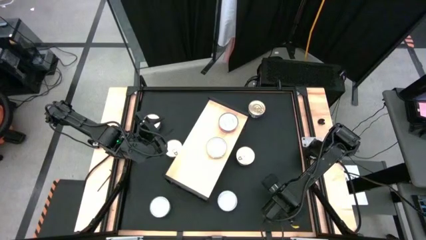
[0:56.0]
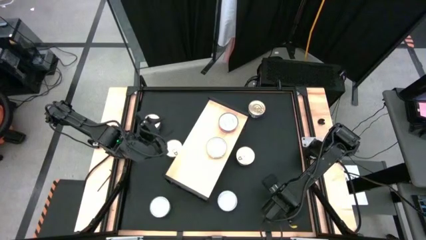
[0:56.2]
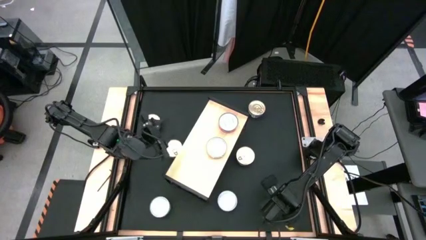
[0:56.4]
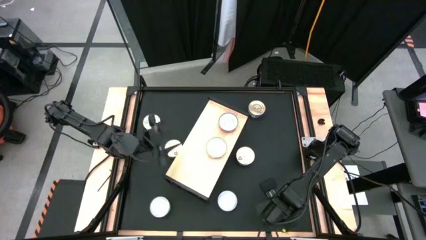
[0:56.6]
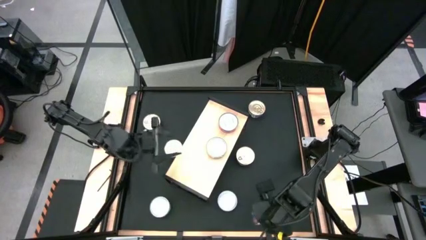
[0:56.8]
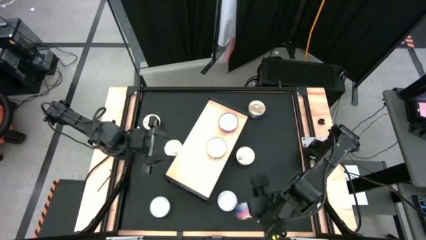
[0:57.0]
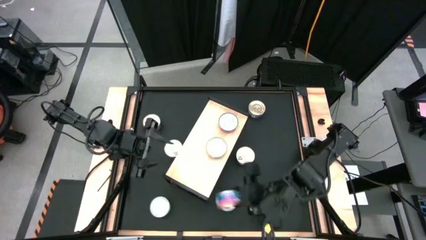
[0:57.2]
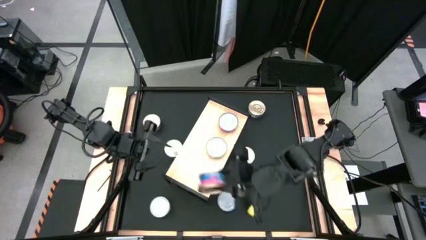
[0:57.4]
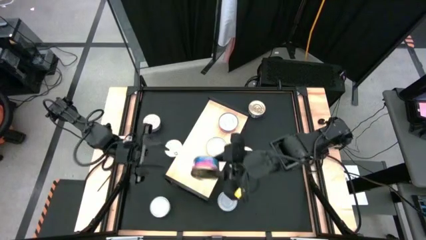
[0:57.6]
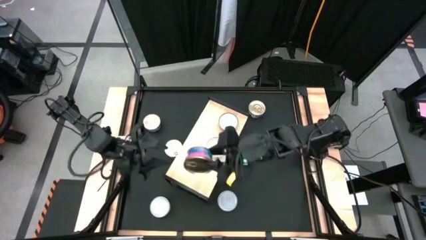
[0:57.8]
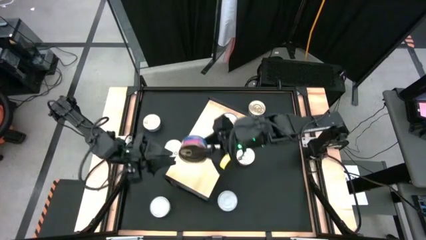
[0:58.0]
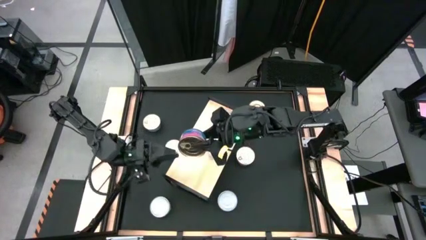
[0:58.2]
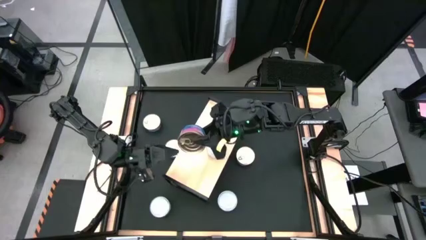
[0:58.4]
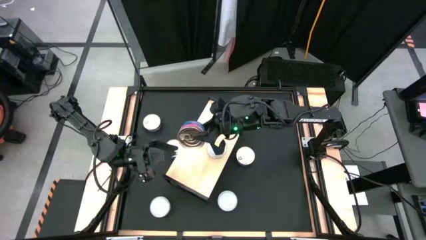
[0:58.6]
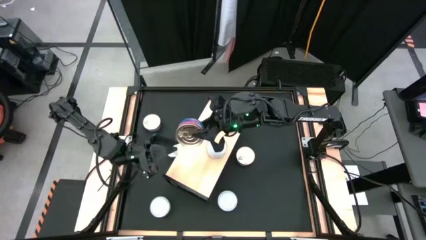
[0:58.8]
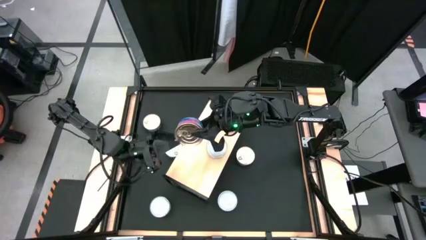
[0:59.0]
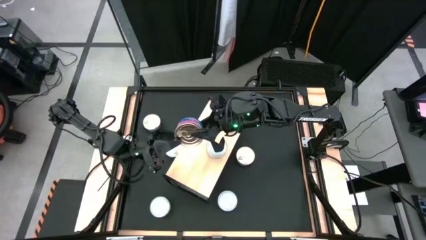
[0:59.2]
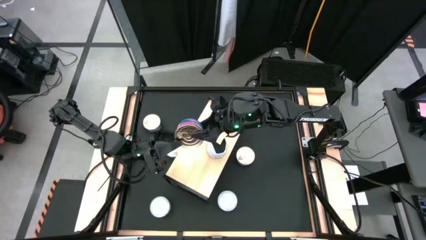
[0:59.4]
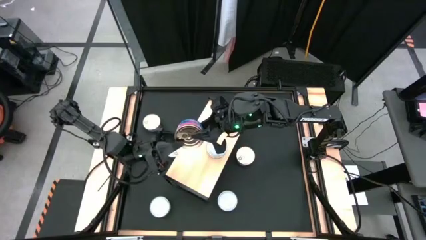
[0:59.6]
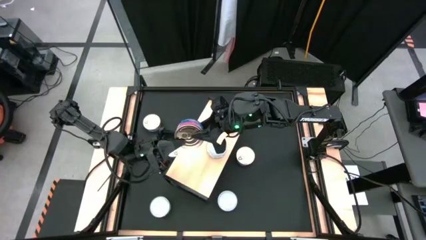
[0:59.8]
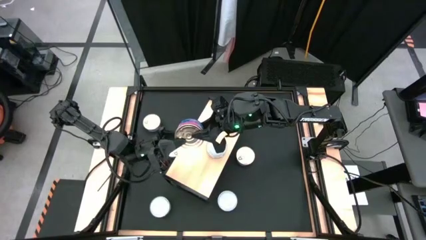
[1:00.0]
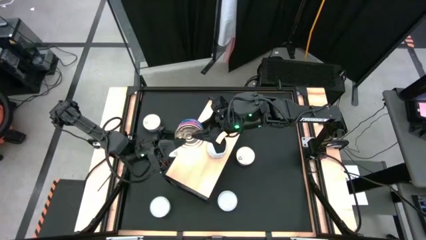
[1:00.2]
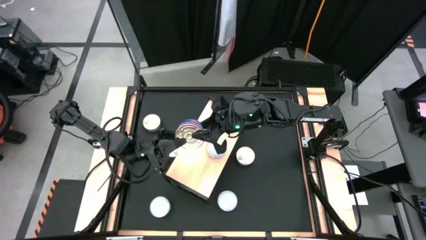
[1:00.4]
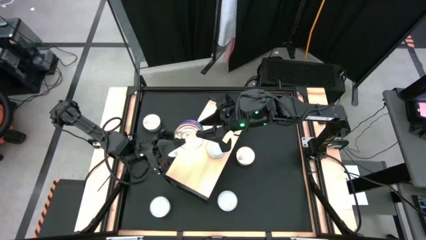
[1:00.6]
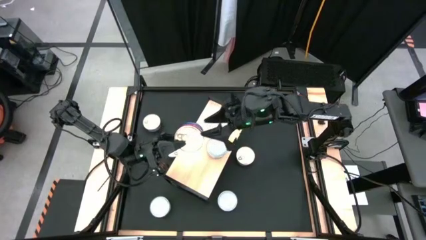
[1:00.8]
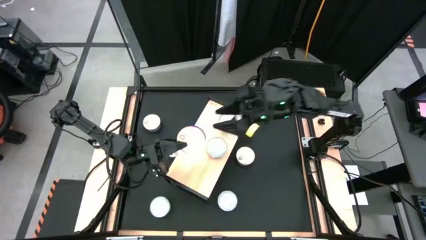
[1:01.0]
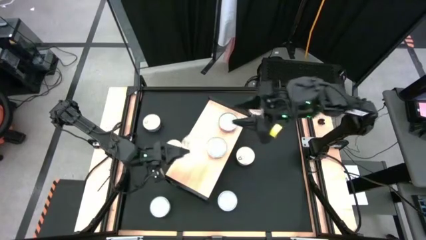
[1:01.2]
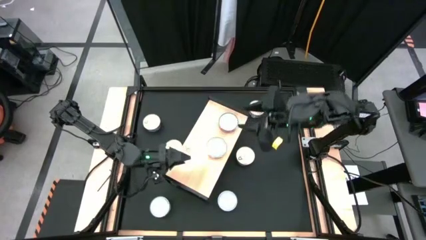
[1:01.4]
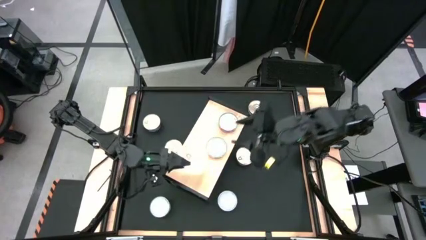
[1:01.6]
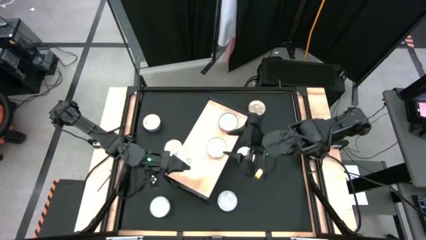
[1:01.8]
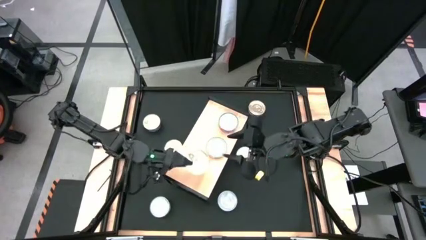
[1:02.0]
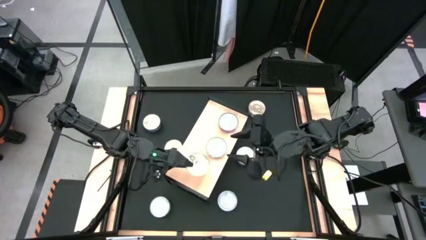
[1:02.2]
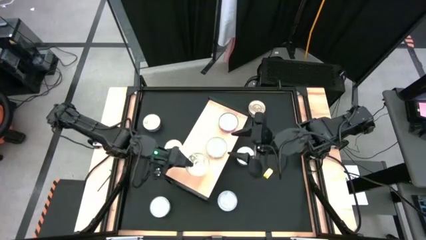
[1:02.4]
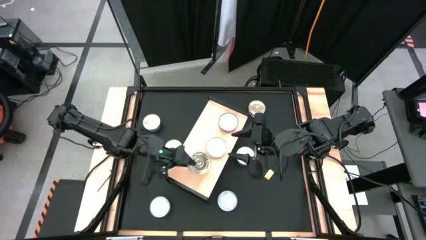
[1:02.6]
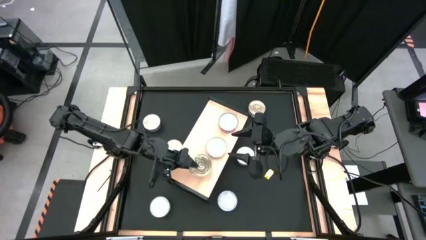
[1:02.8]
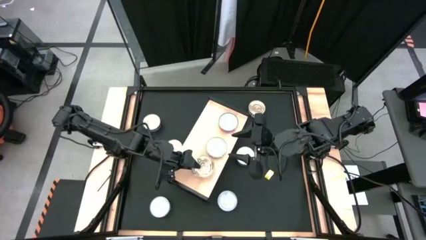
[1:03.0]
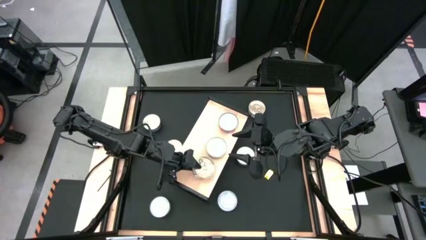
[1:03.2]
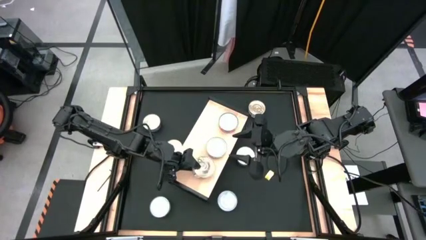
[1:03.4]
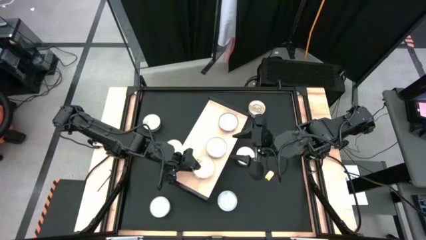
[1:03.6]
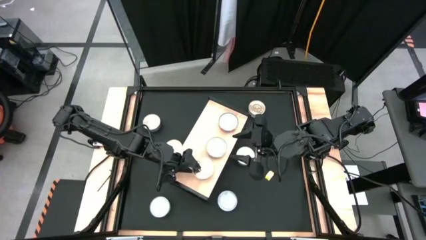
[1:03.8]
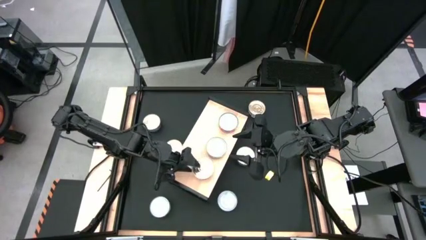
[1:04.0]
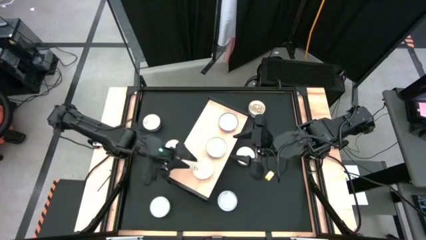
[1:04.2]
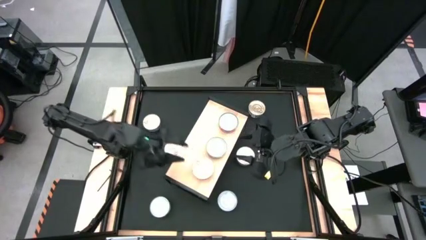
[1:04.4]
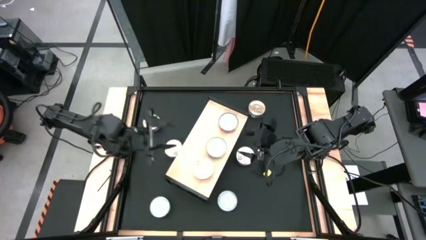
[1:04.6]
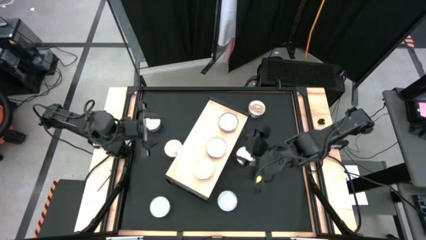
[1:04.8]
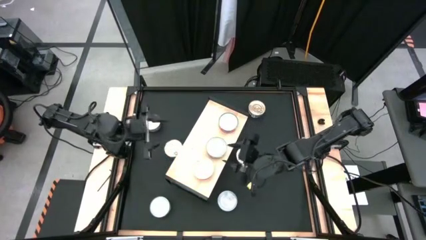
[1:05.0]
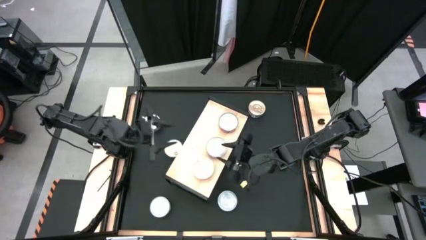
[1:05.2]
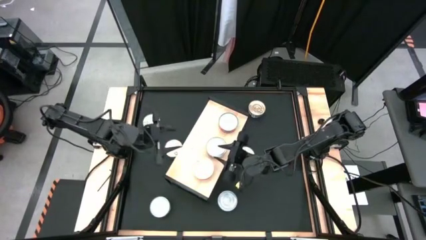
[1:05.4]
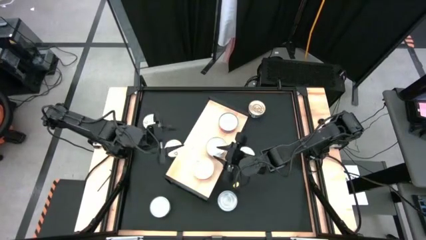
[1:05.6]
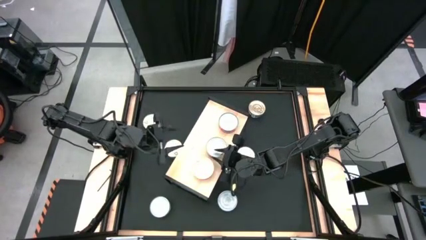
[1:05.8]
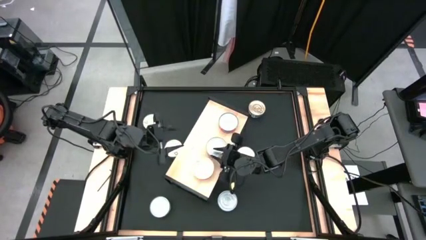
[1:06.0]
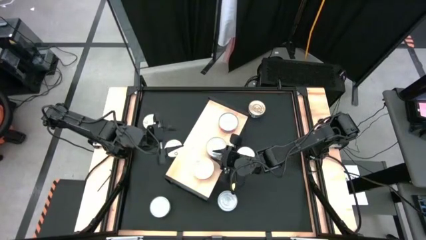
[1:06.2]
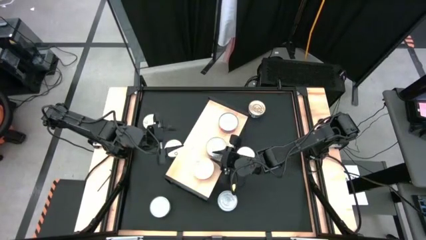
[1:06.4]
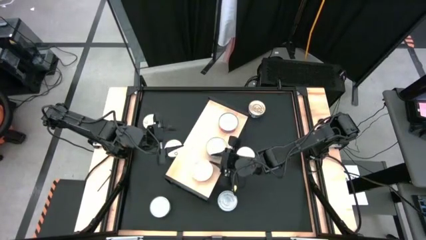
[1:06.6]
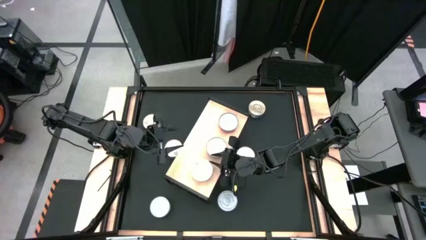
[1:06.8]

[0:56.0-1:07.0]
Task: Stack canned seafood by type on shelf
Put the blue tuna can on the shelf
